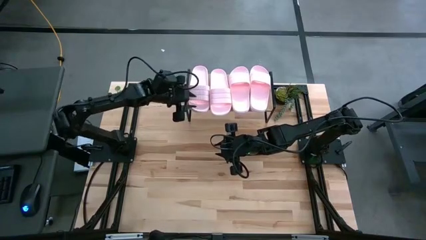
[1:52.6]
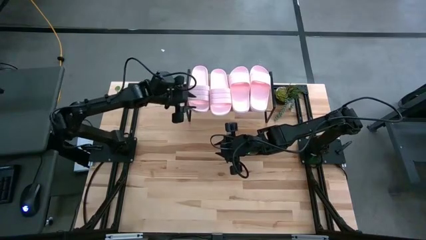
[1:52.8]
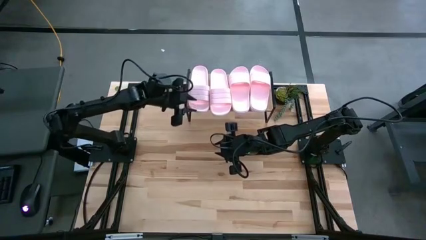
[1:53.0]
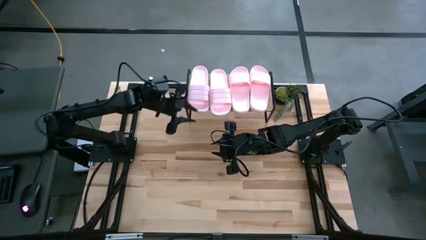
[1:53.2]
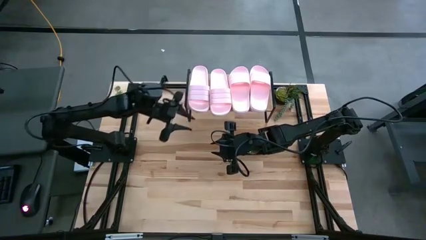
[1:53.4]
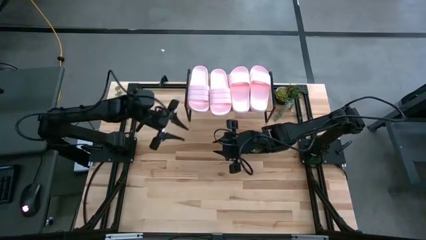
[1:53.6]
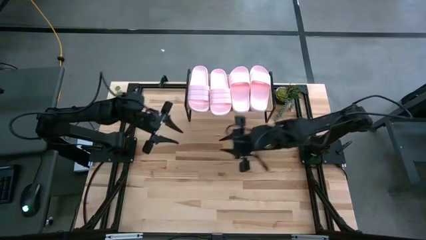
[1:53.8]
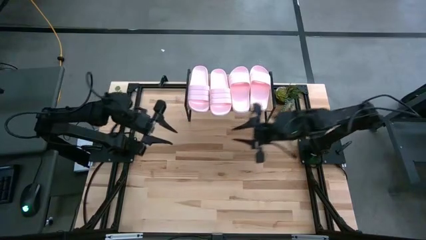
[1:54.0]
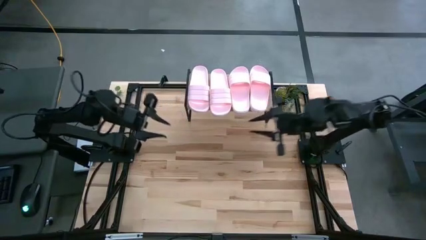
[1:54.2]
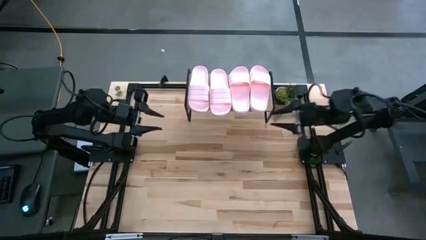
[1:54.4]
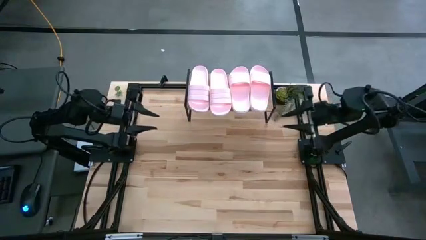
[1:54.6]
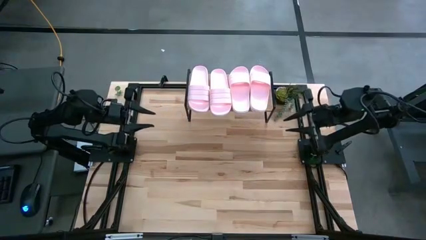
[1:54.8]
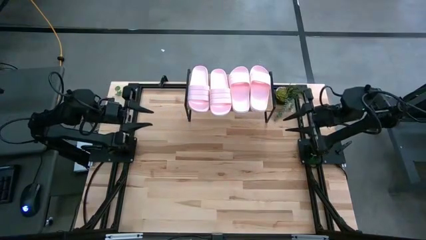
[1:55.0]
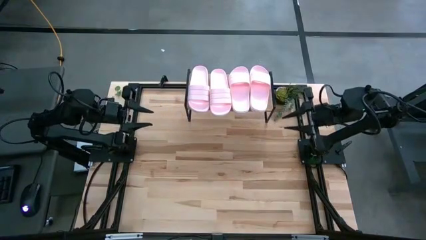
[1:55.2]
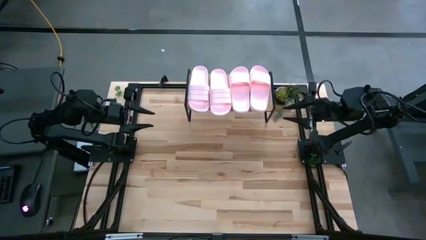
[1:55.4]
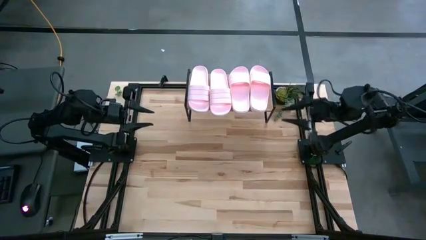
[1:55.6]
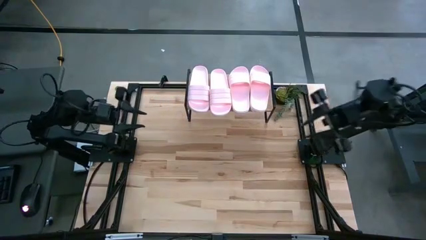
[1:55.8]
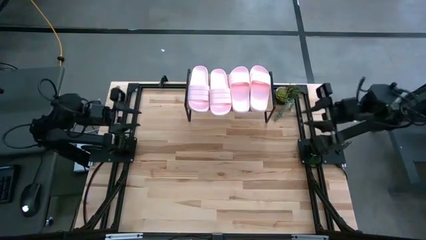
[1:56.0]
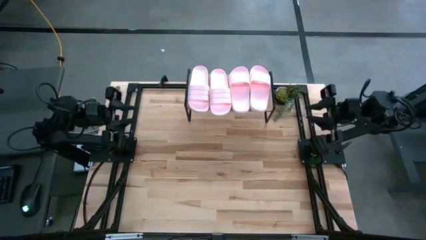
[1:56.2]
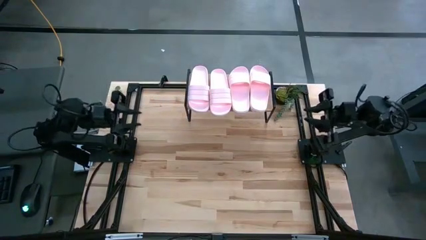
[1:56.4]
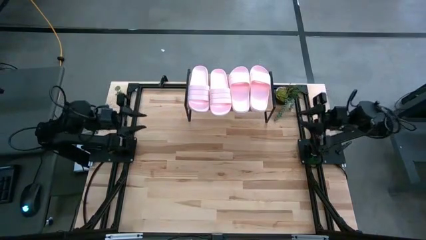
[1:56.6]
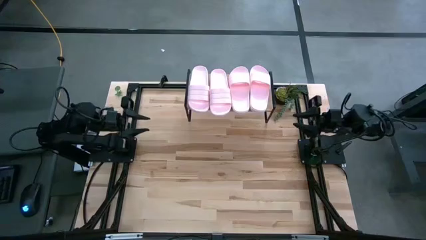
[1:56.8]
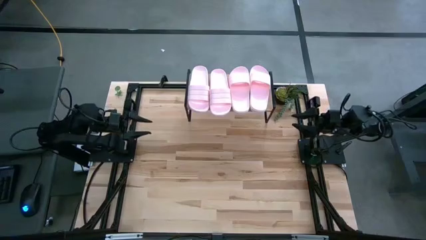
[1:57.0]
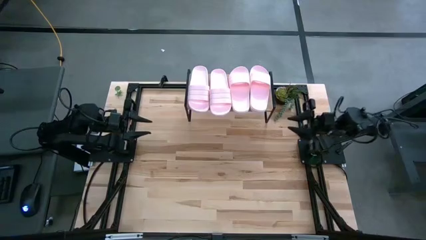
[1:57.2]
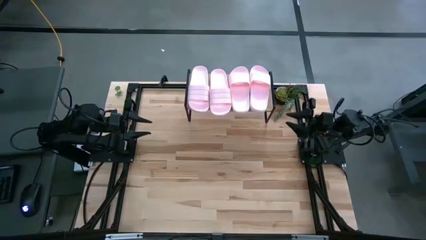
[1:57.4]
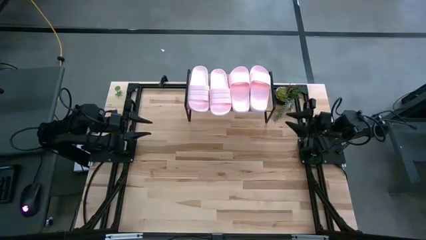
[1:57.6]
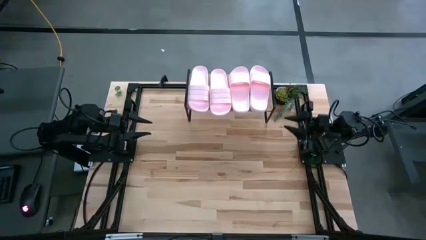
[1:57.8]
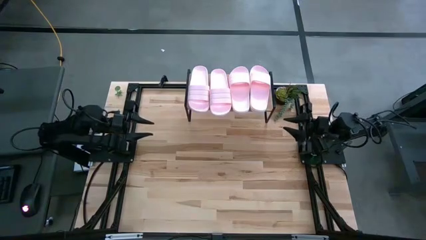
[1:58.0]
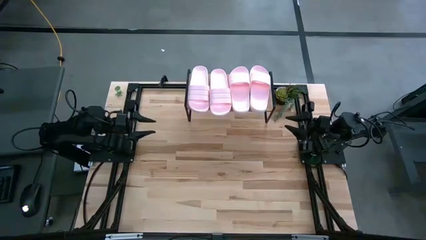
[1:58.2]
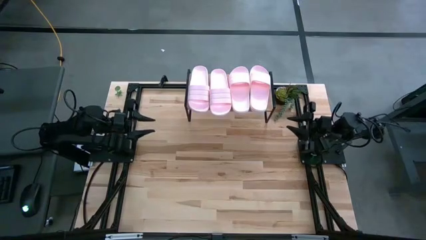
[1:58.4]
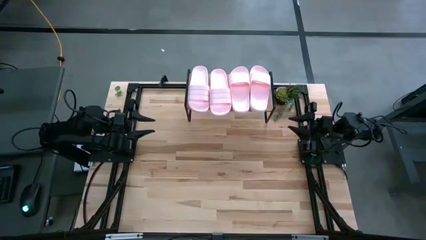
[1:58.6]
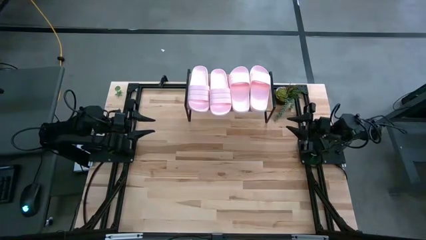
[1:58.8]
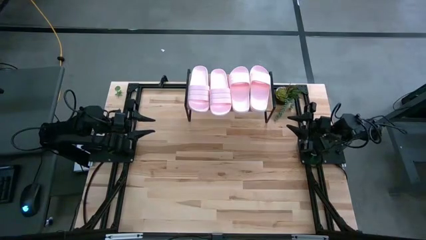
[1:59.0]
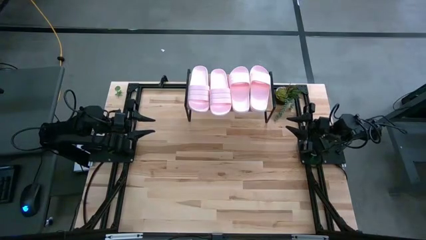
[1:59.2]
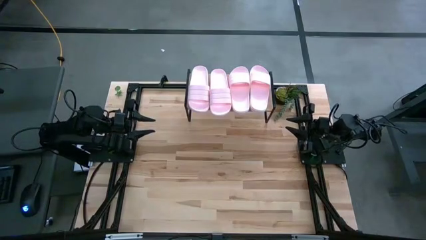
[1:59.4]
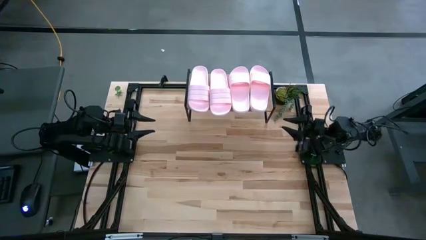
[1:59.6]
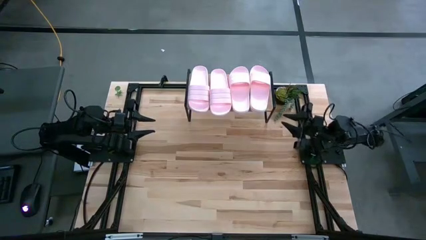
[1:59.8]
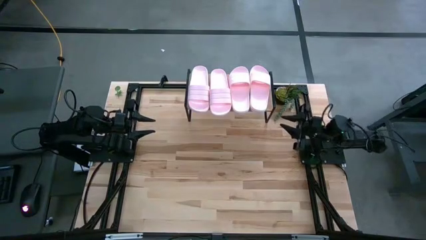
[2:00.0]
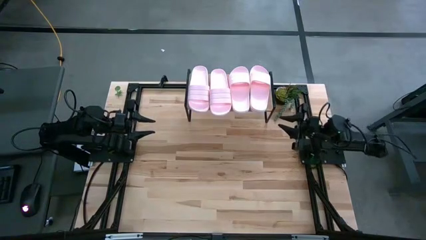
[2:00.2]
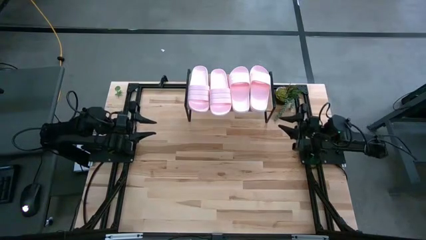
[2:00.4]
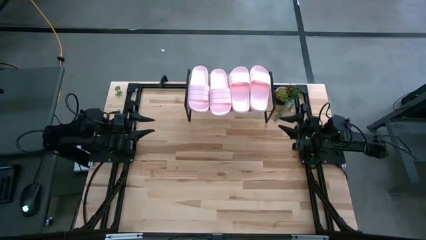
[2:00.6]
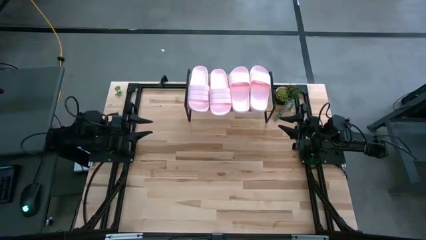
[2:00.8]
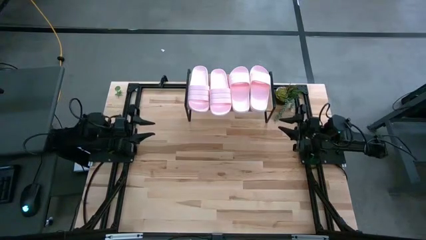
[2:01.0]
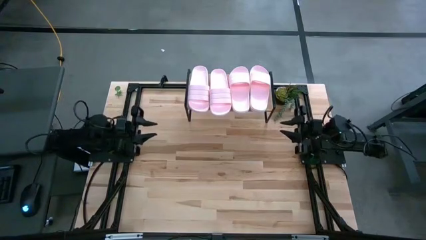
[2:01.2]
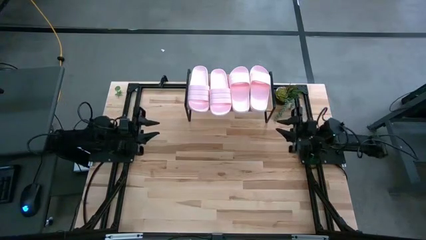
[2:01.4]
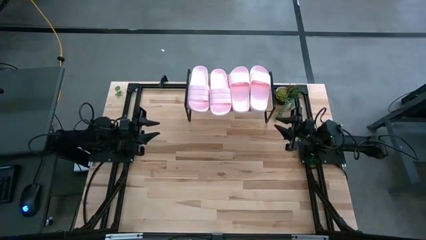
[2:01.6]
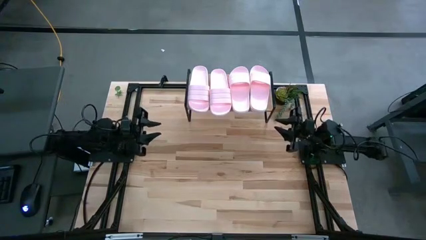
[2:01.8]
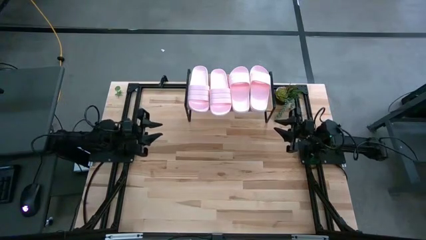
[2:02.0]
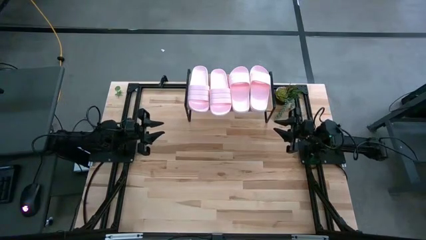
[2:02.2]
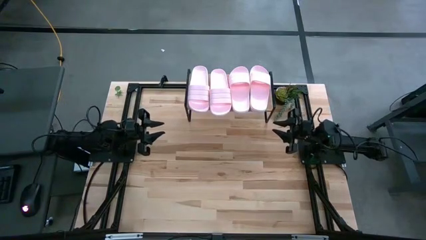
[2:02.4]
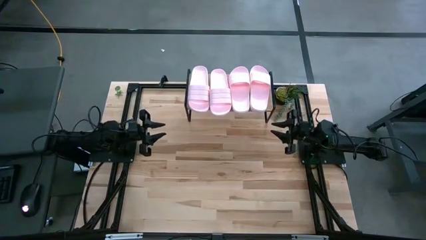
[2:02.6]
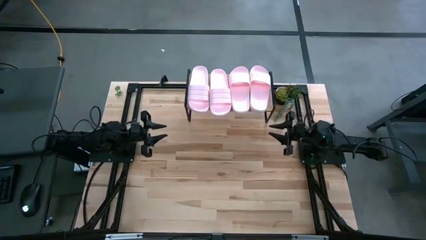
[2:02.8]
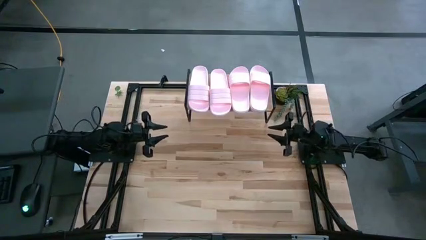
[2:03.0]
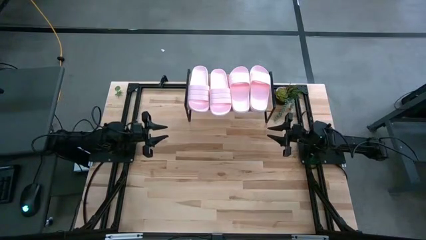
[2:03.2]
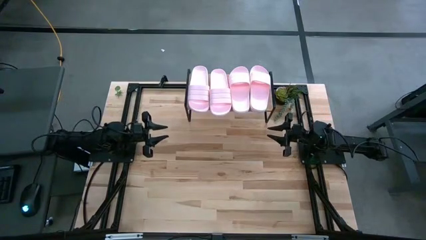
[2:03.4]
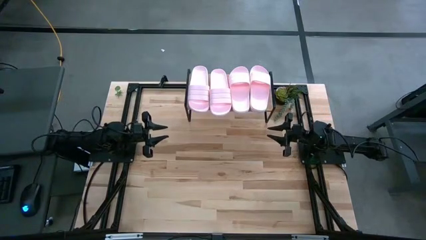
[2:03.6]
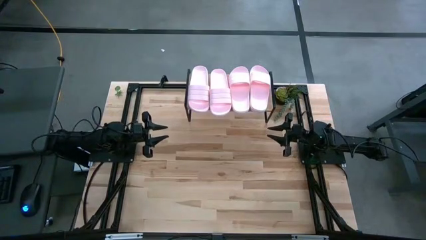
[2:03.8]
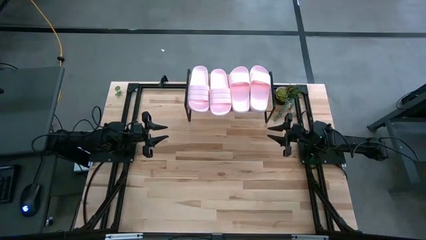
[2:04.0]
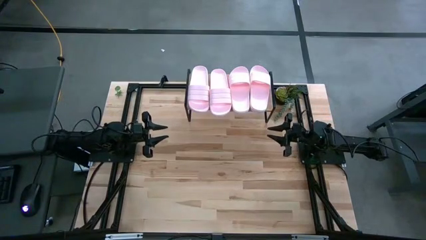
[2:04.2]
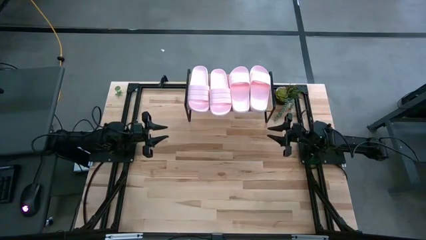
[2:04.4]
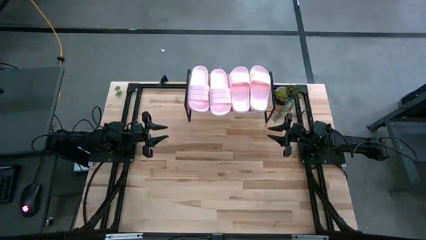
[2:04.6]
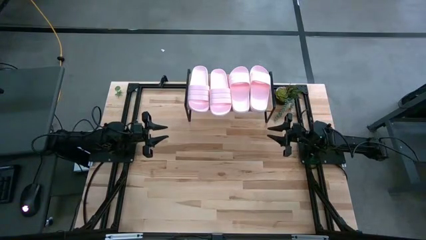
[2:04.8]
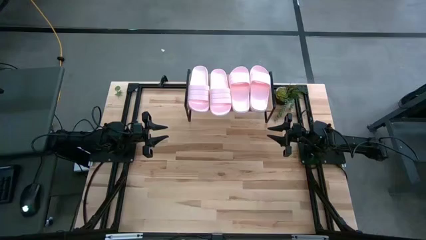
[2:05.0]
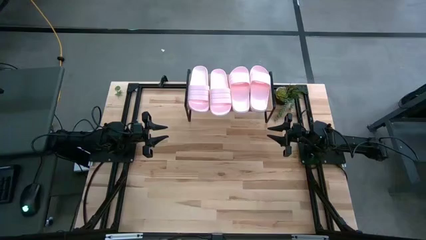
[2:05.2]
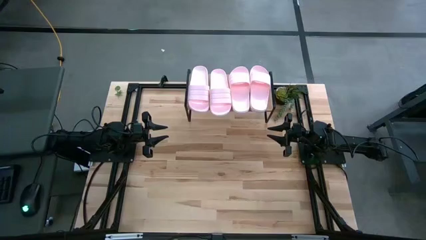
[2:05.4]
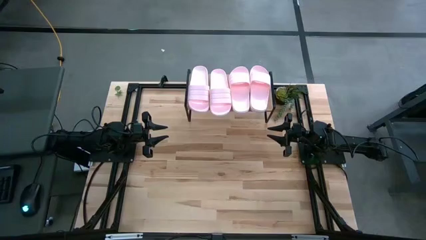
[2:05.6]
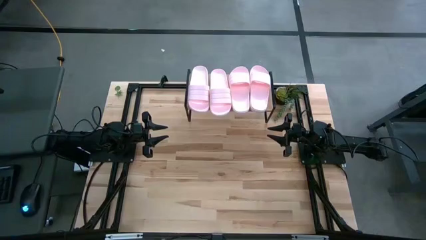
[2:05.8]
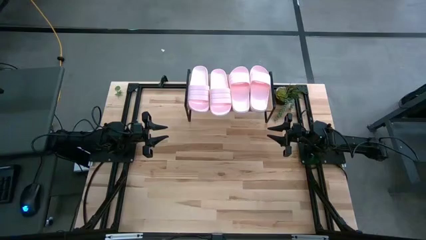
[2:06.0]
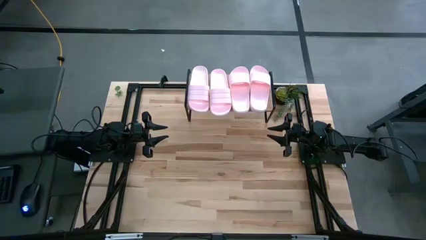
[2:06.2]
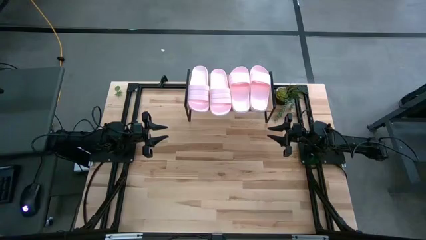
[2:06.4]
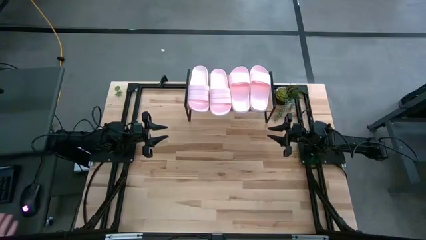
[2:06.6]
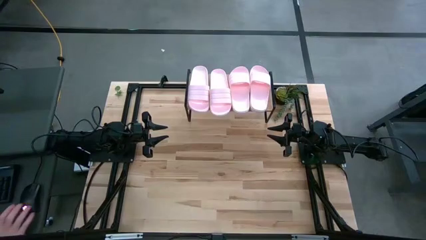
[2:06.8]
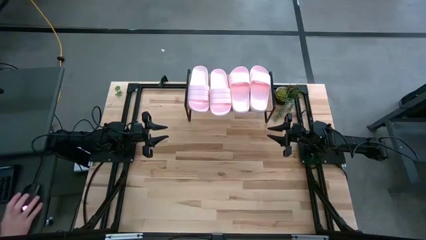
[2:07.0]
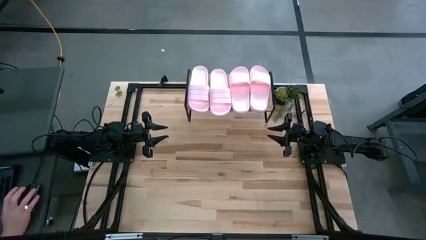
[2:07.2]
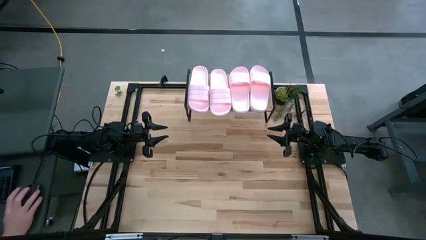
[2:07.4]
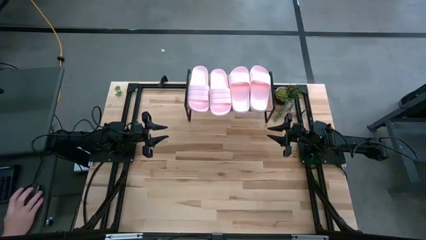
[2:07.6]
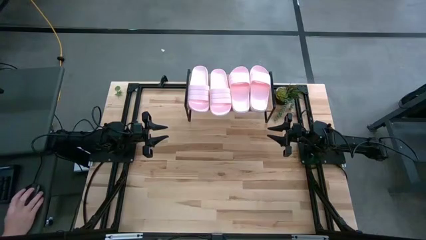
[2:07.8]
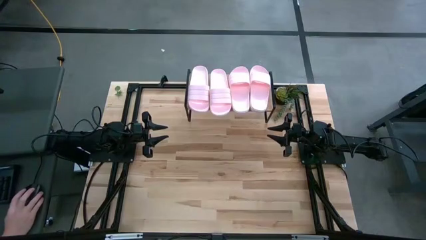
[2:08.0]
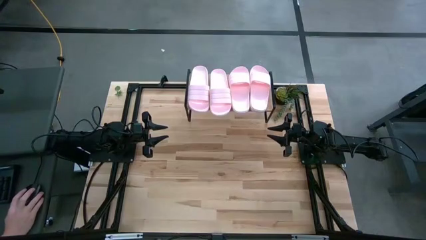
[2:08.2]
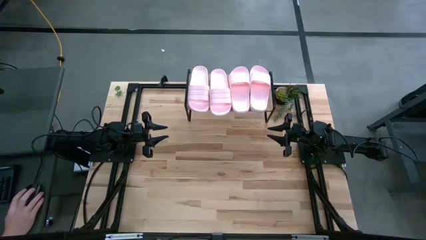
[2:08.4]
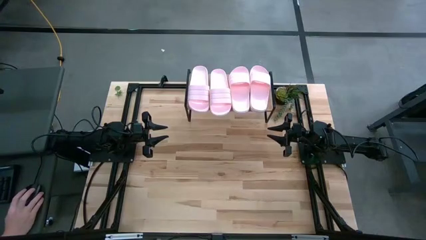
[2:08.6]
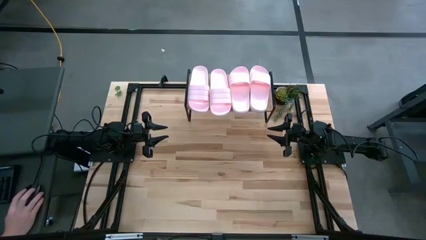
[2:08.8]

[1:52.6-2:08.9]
Task: Pick and place slides into the shelf
Return to Home Position

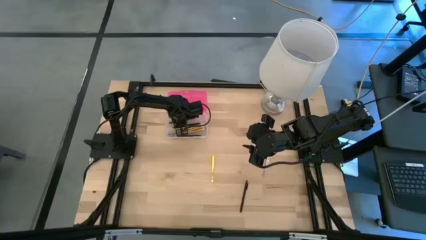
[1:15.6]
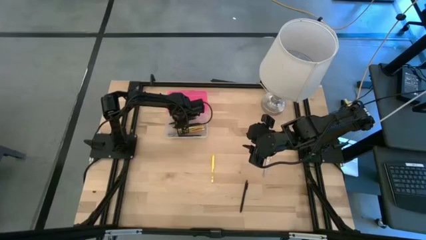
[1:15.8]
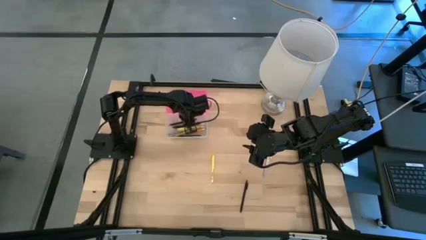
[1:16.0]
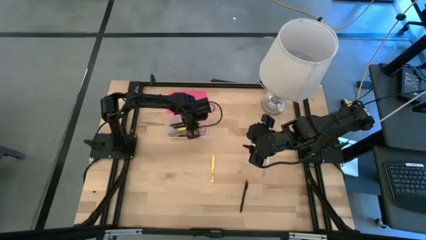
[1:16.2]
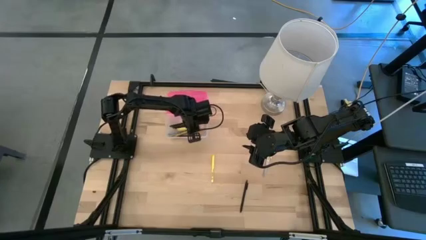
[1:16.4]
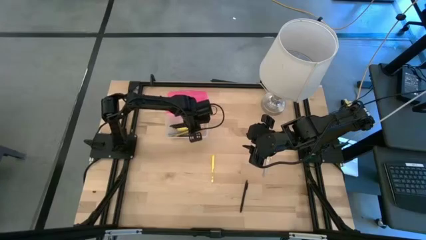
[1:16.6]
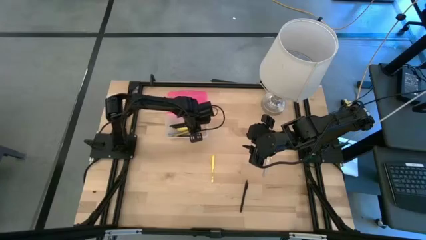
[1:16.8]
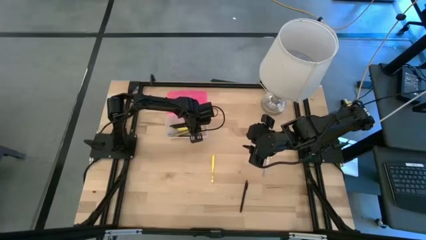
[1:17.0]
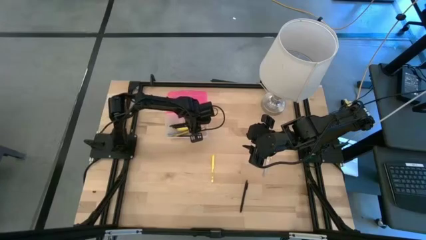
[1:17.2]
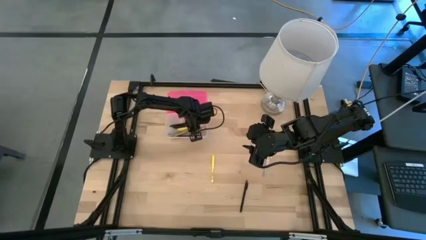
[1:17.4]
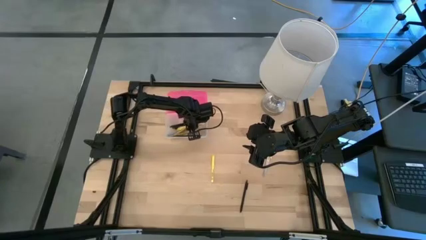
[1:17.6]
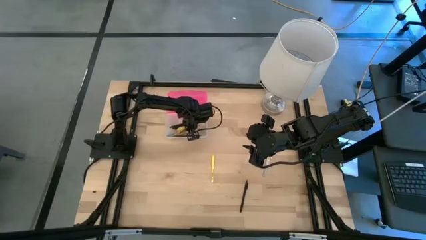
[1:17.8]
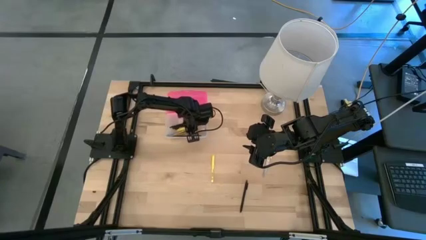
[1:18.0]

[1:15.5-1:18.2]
Task: Pick & place school supplies into a supply box
Adjust the school supplies in the pink supply box
